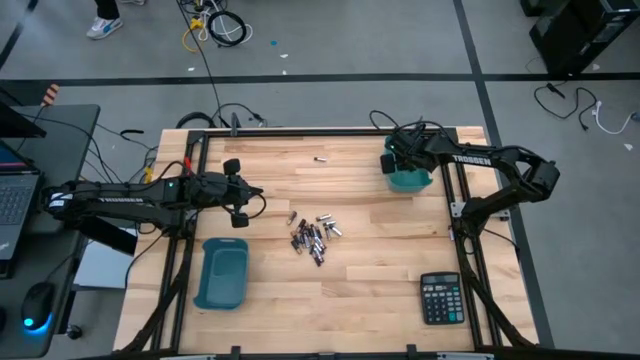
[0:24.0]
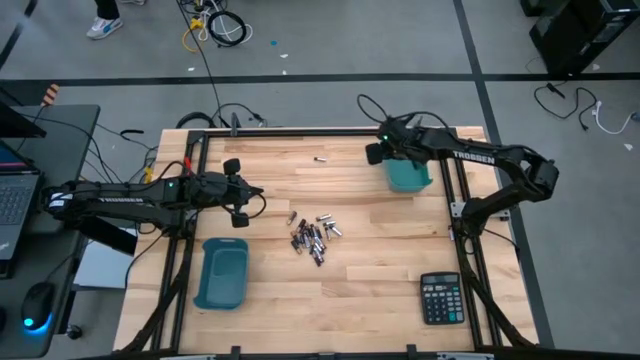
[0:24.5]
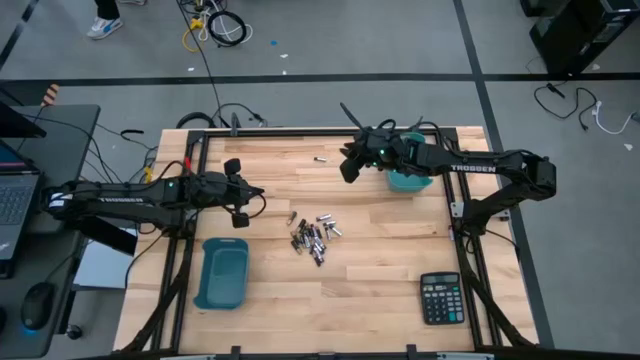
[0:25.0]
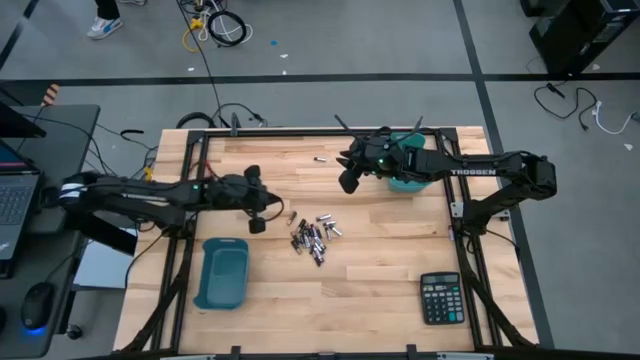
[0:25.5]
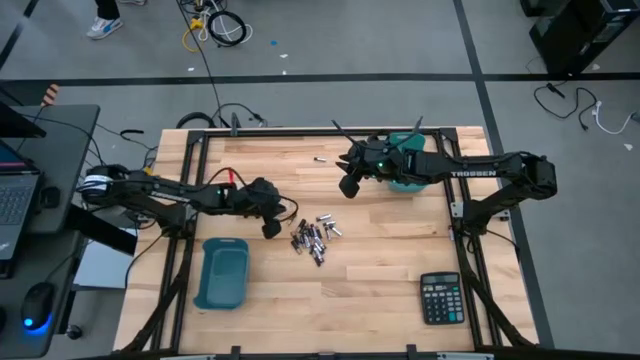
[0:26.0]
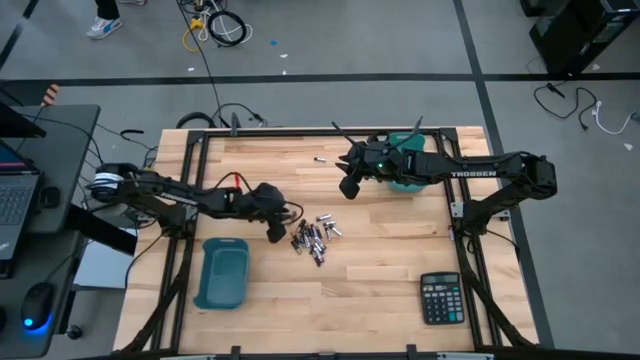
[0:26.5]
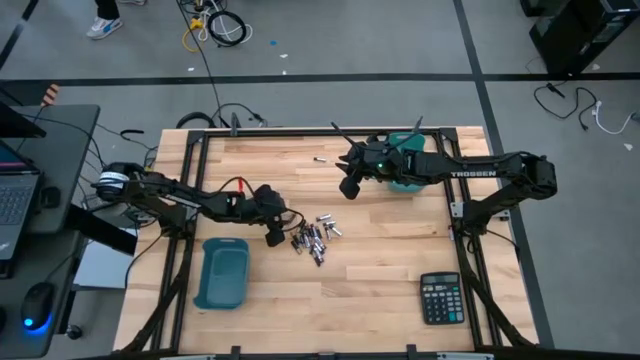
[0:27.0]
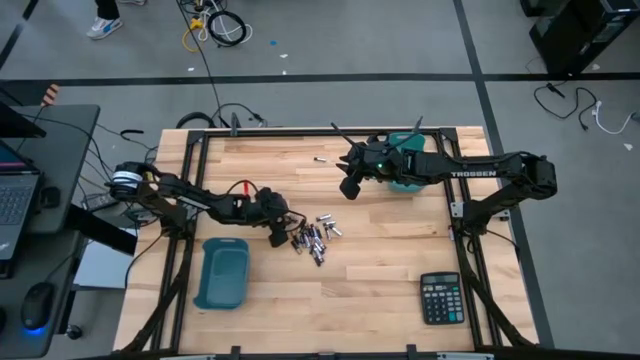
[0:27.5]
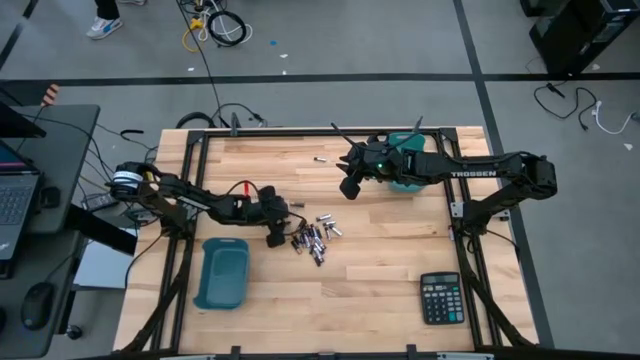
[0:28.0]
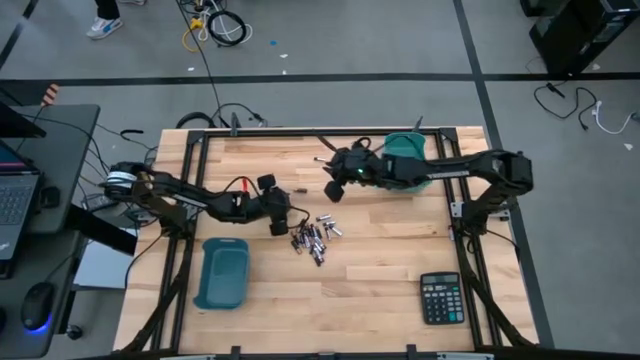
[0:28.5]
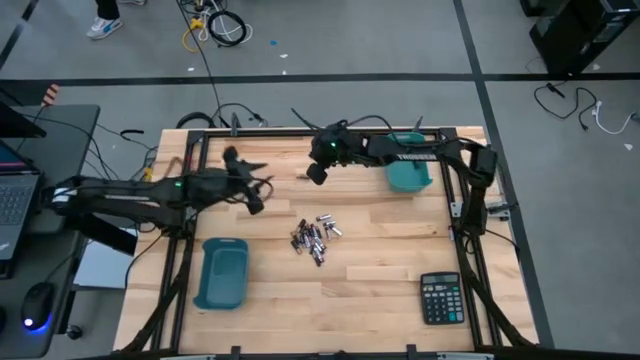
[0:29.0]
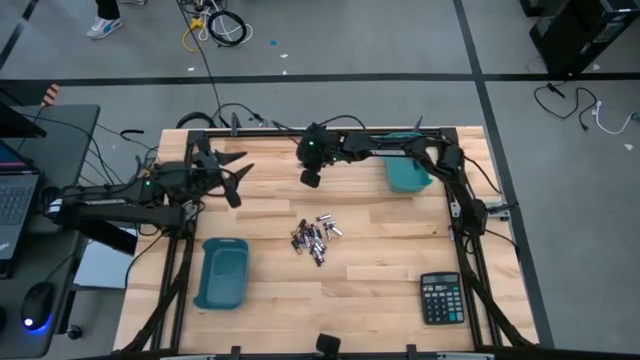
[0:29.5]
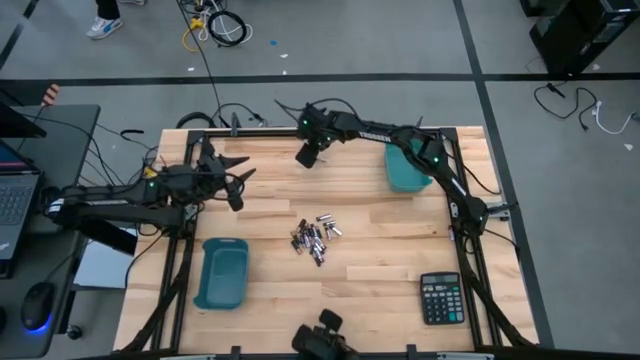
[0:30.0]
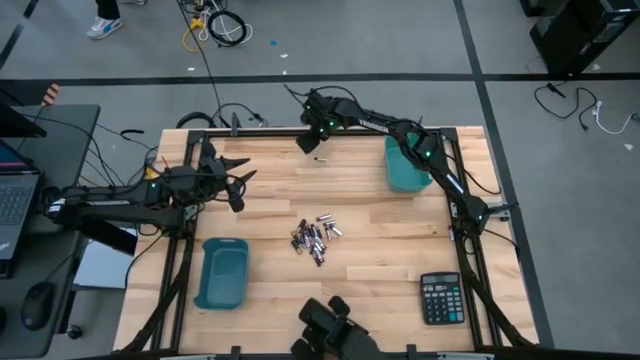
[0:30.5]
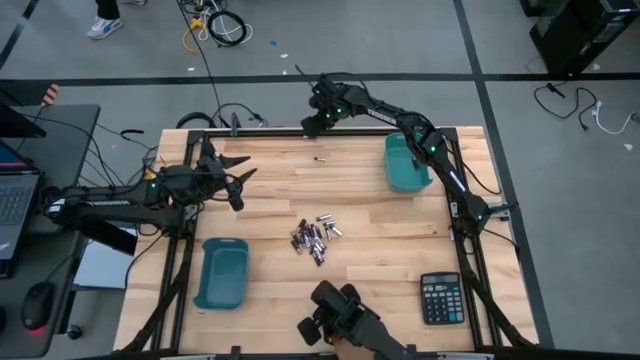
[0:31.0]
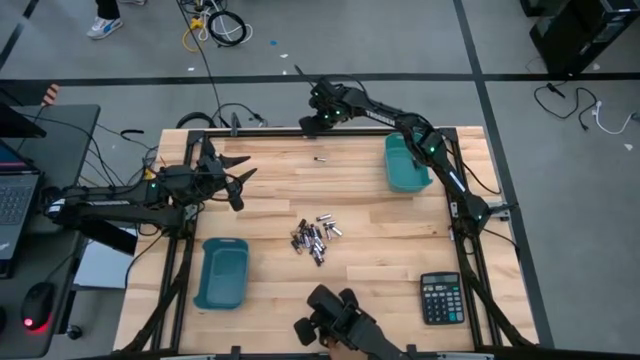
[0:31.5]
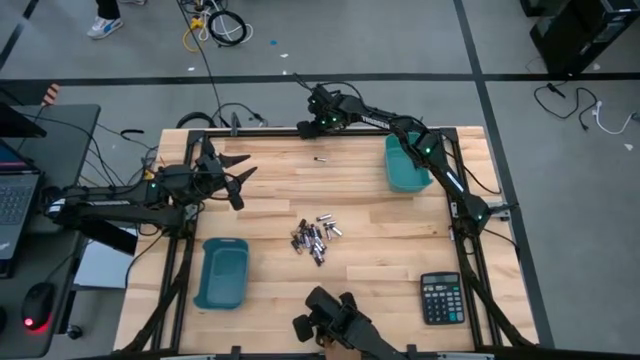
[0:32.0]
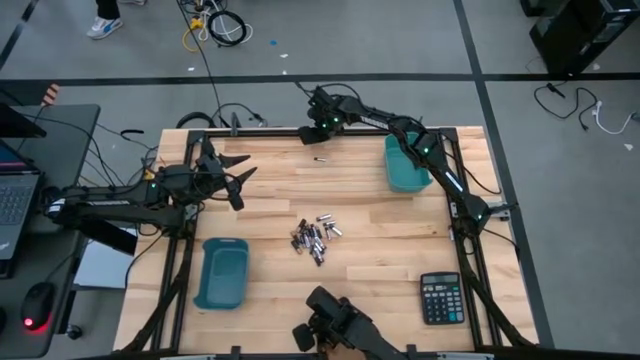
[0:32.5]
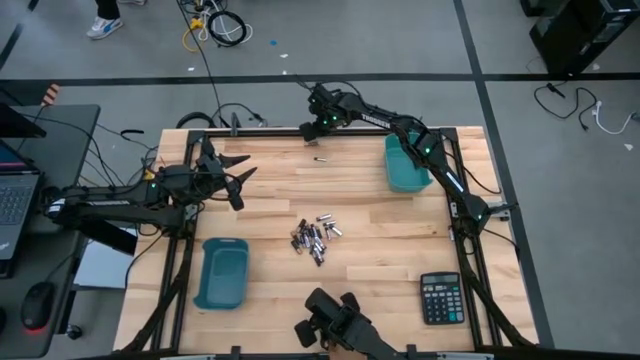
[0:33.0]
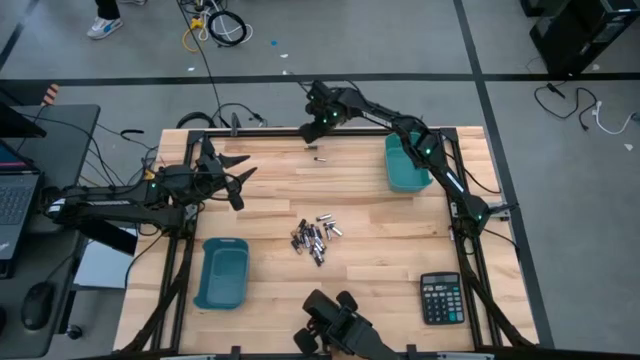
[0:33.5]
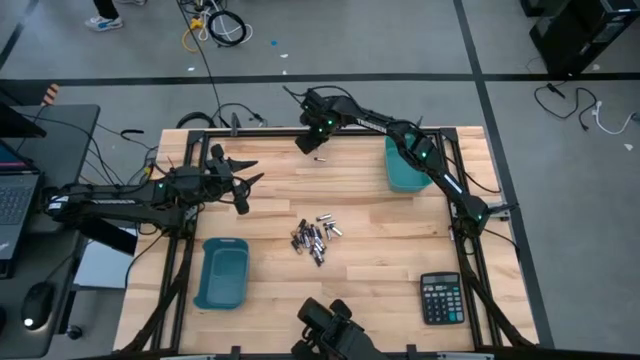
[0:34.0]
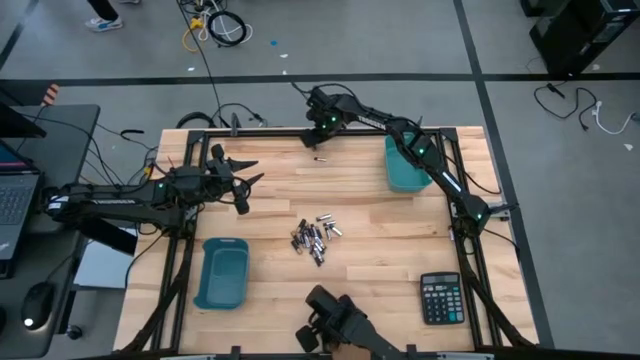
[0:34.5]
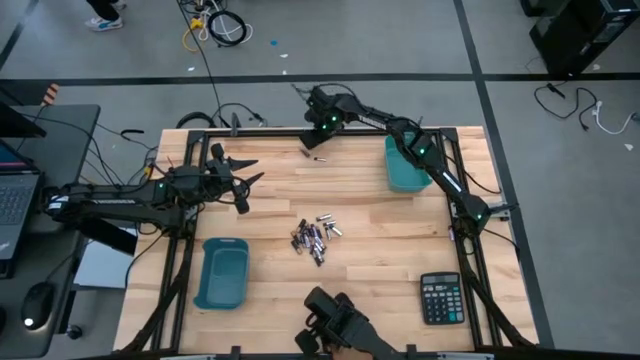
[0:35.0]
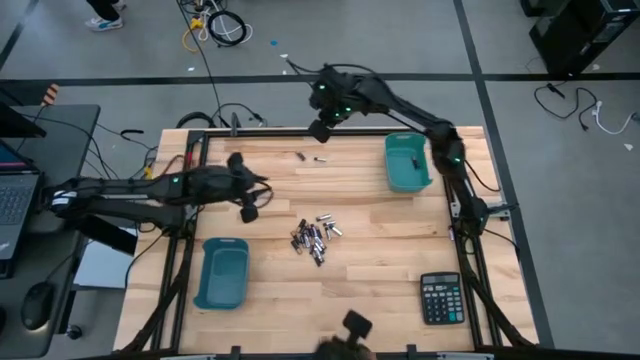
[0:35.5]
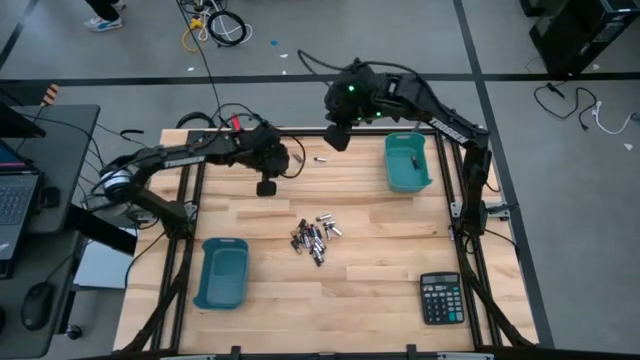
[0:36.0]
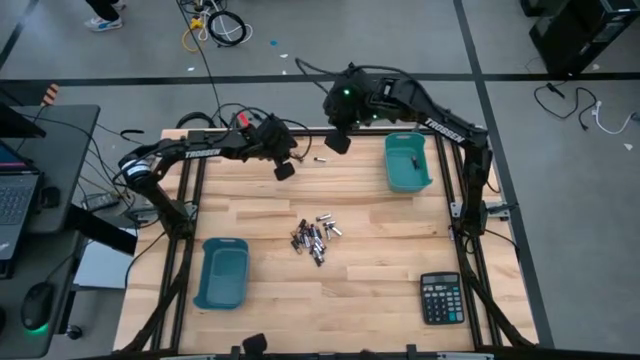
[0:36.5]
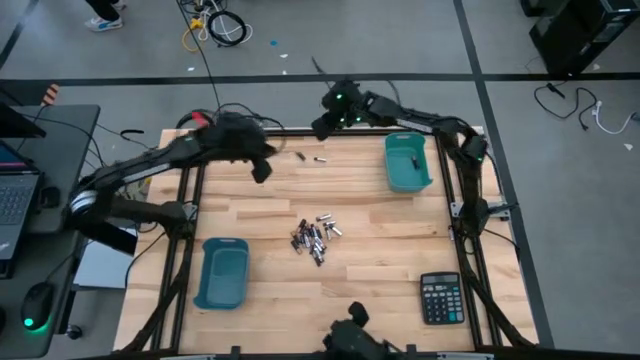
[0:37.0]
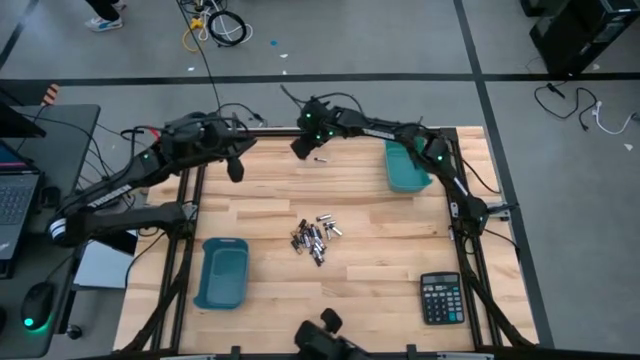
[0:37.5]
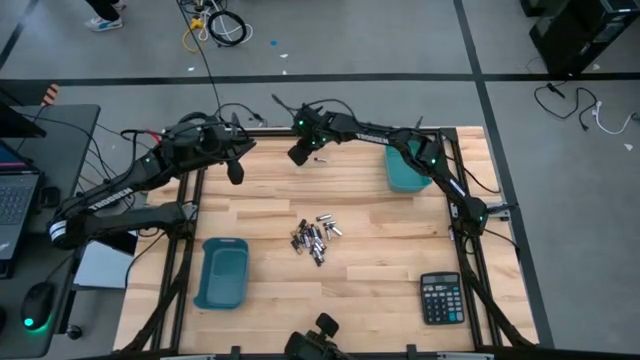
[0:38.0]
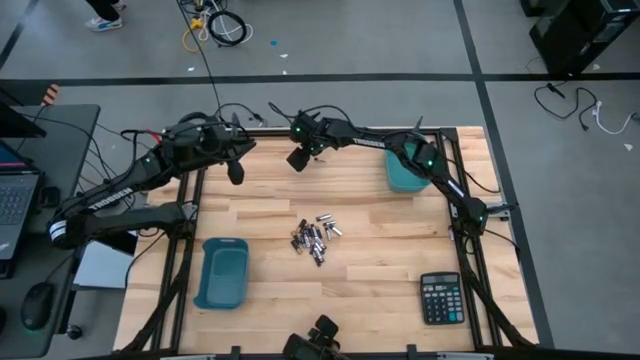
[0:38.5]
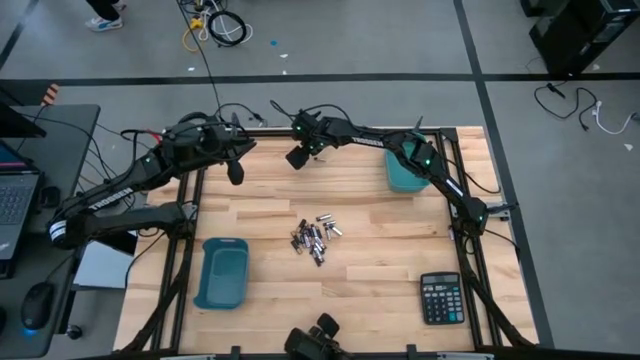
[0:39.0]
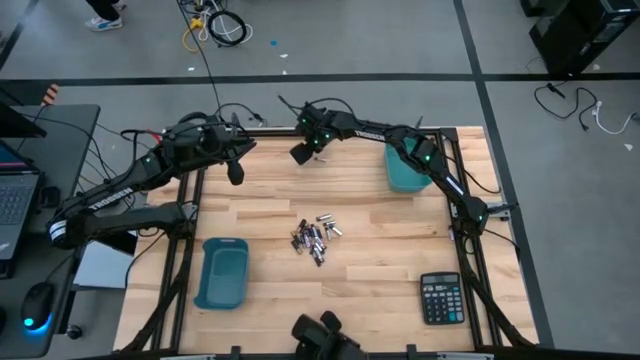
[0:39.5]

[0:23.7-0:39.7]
Task: Sort batteries
Put the black battery into the green bin

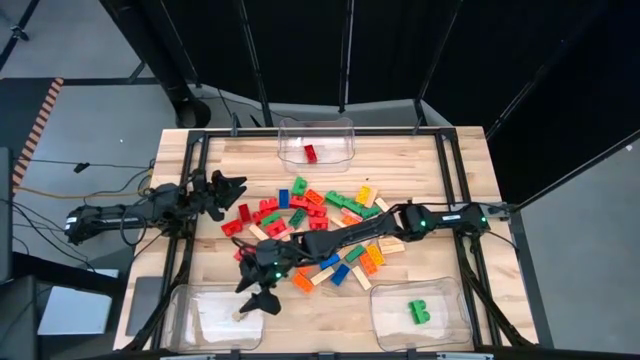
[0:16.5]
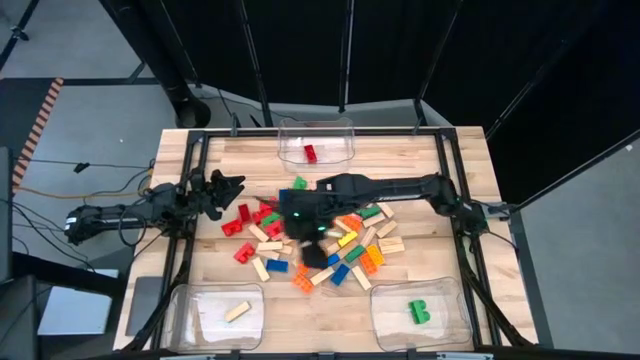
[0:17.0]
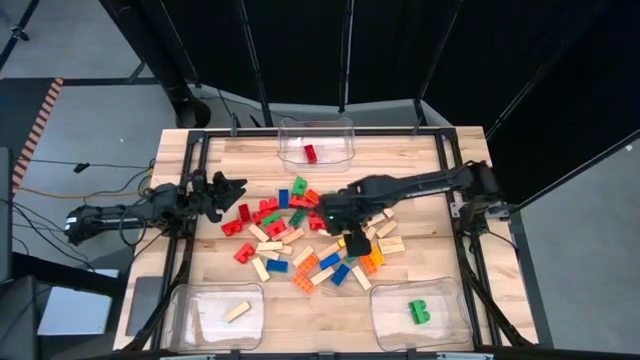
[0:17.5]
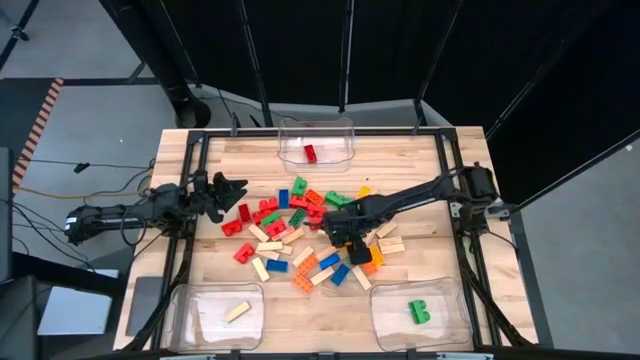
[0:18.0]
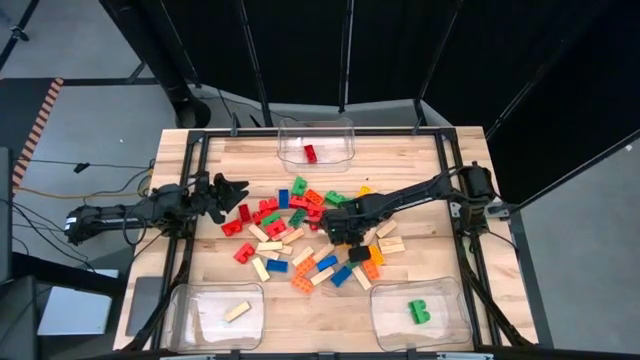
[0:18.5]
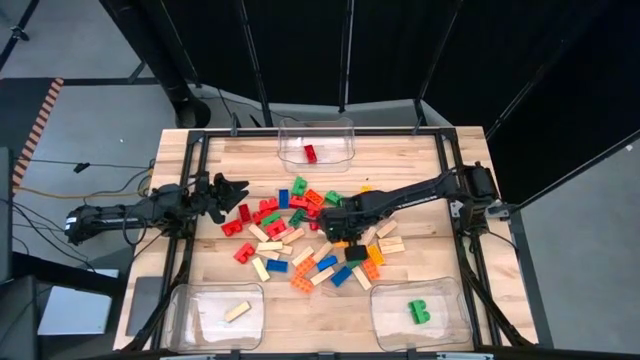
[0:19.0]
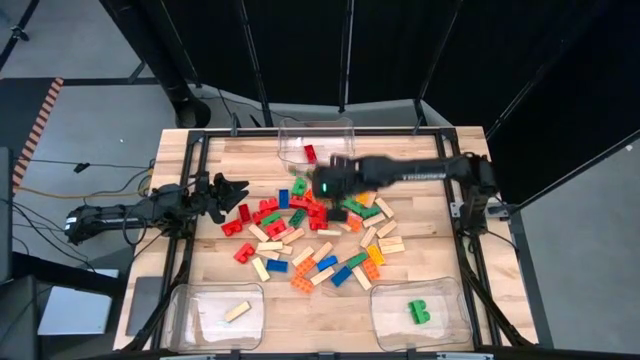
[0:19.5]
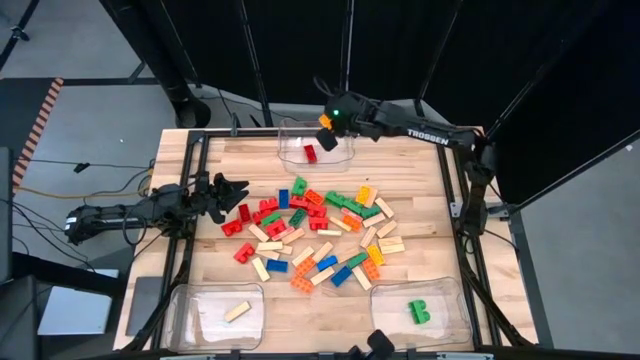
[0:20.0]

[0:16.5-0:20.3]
Task: Sort blocks by size
Put the 4-stud yellow game piece into the top center transparent bin

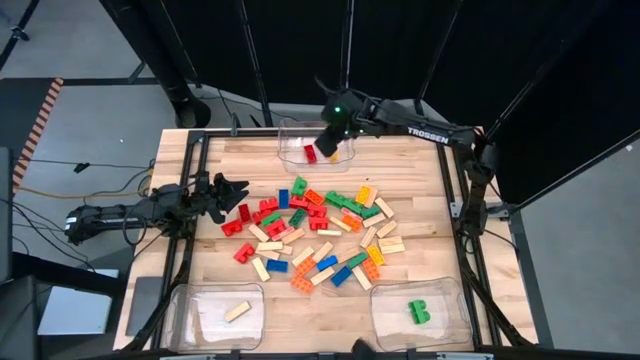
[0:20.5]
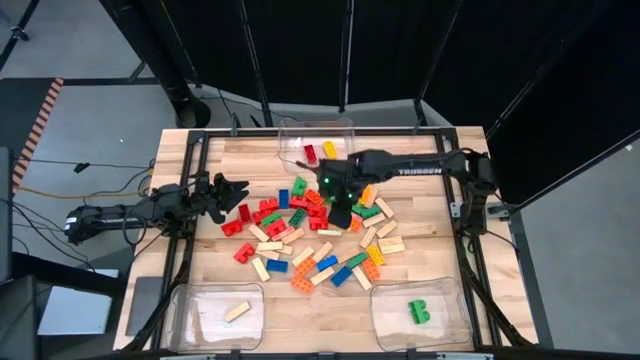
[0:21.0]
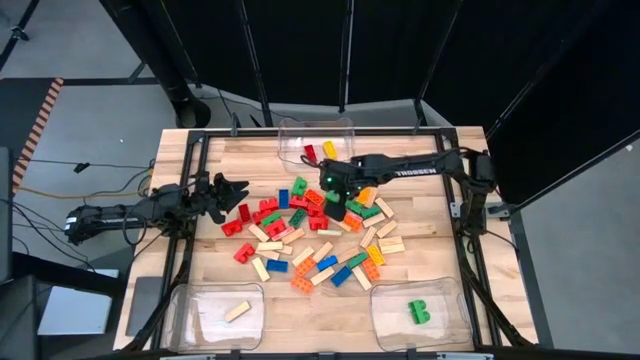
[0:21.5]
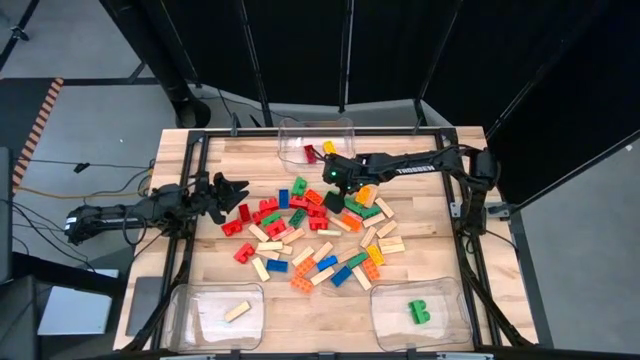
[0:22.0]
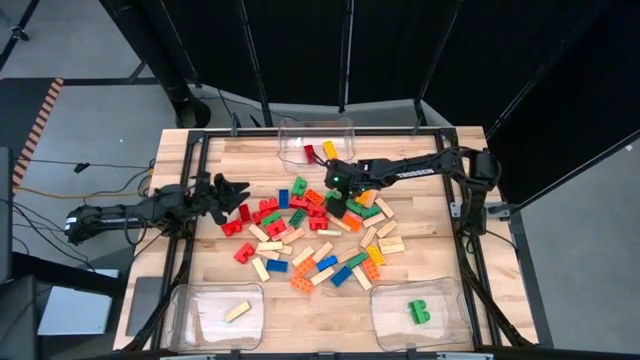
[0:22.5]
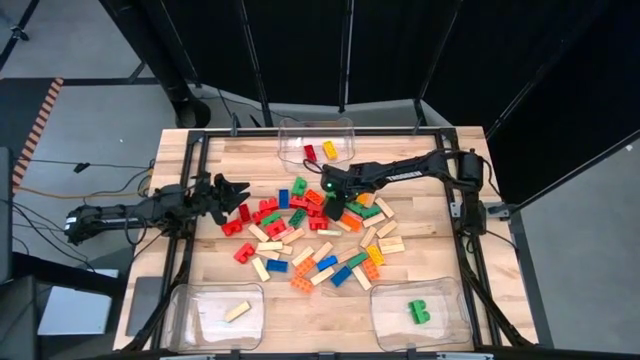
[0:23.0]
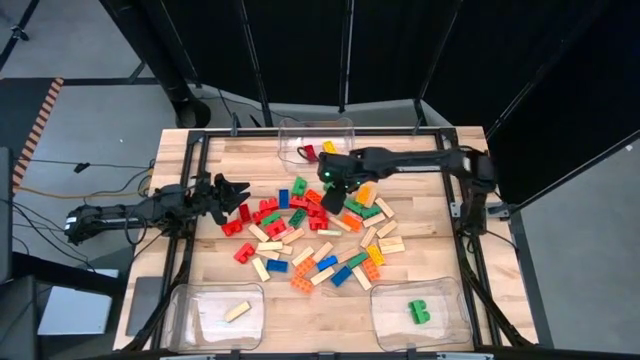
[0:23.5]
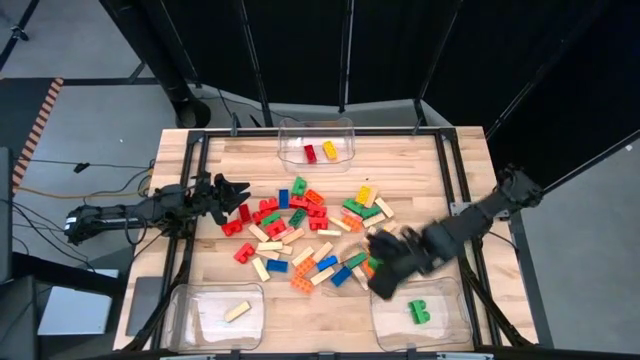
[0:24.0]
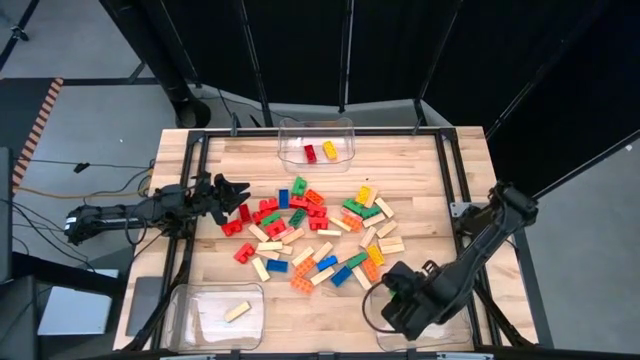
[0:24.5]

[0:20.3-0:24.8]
Put the 2-stud green game piece into the bottom right transparent bin
